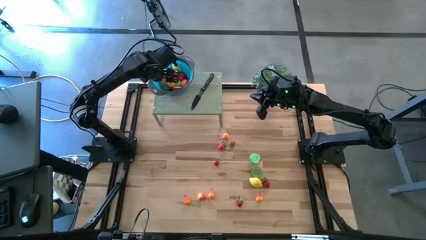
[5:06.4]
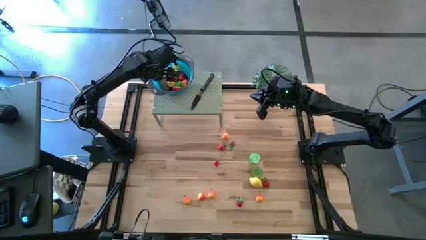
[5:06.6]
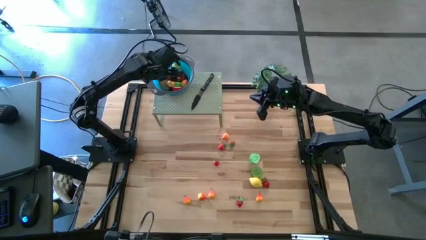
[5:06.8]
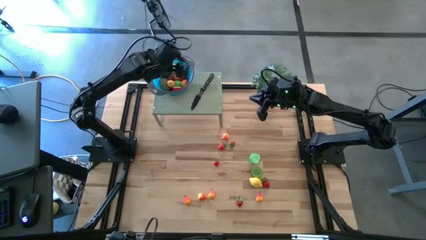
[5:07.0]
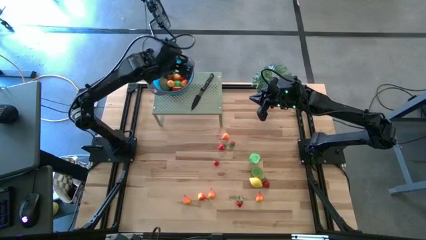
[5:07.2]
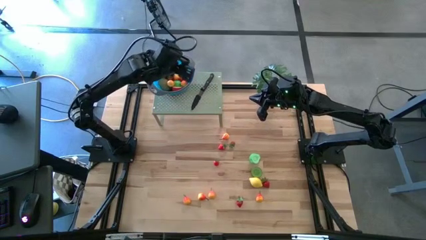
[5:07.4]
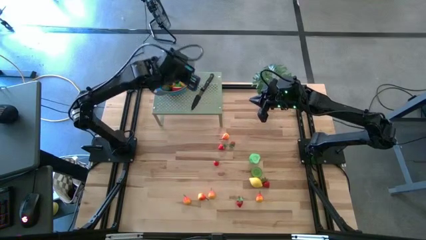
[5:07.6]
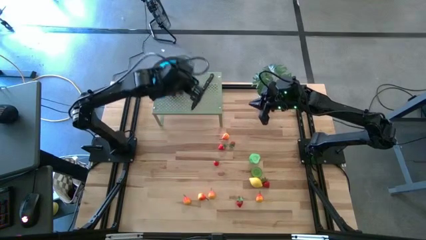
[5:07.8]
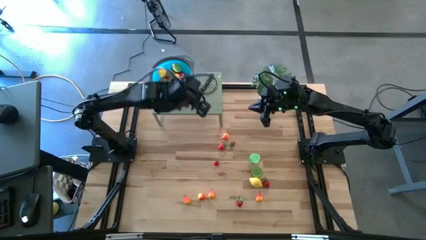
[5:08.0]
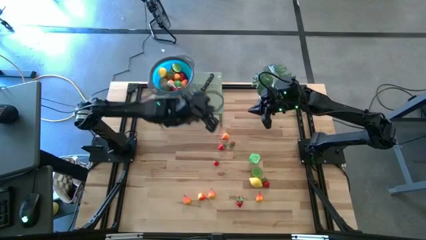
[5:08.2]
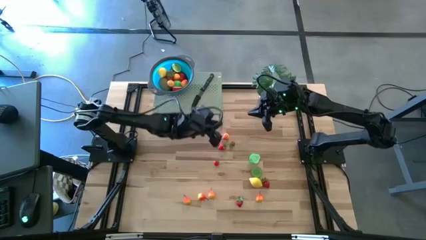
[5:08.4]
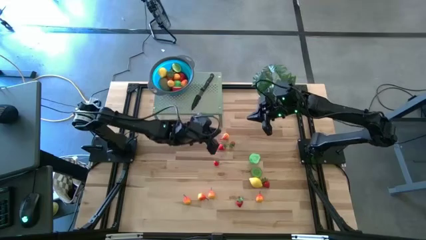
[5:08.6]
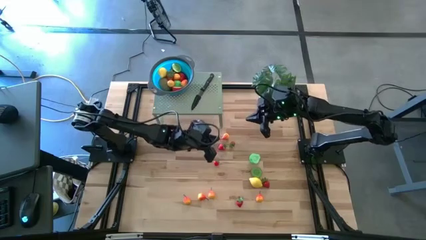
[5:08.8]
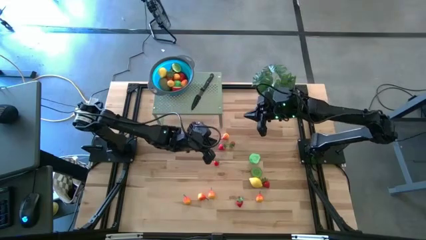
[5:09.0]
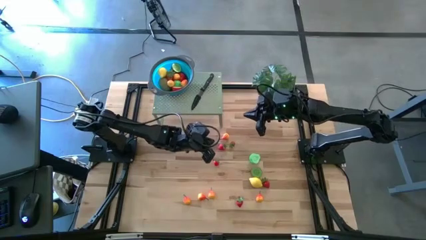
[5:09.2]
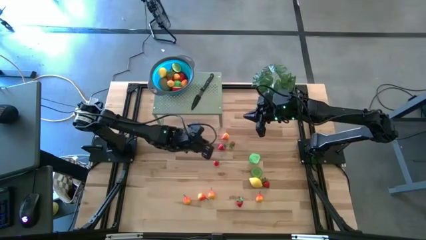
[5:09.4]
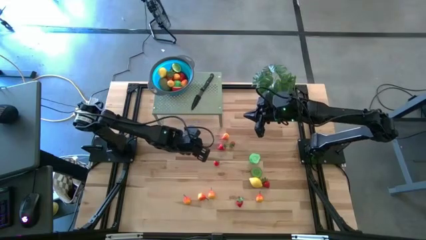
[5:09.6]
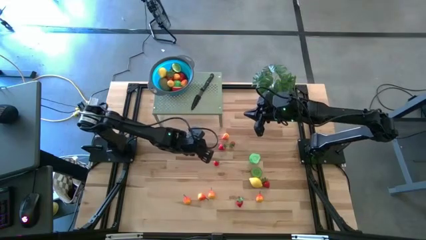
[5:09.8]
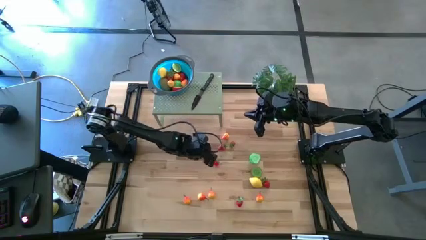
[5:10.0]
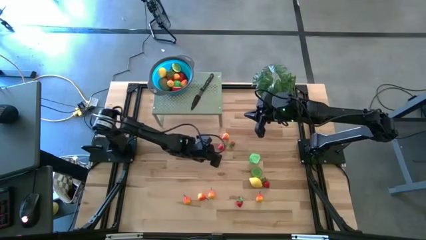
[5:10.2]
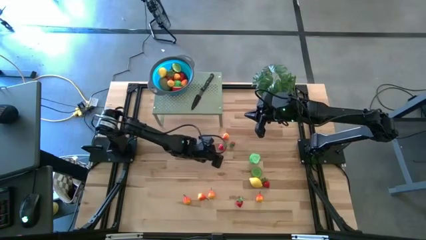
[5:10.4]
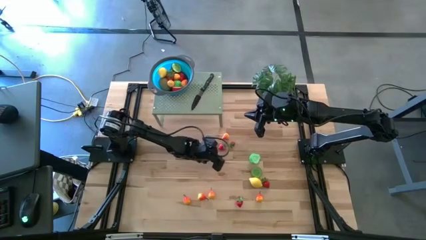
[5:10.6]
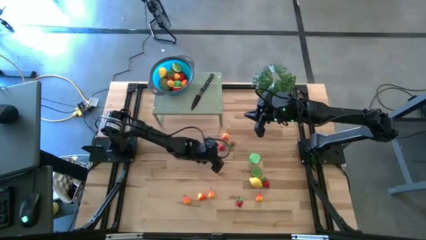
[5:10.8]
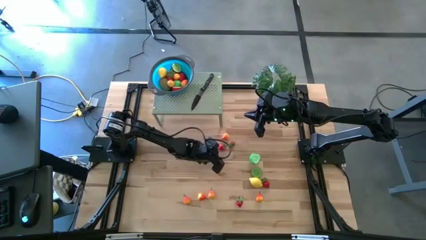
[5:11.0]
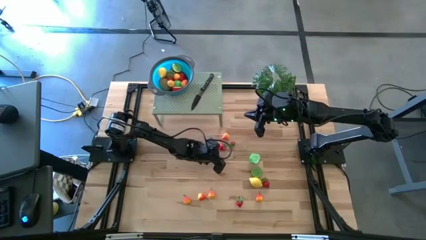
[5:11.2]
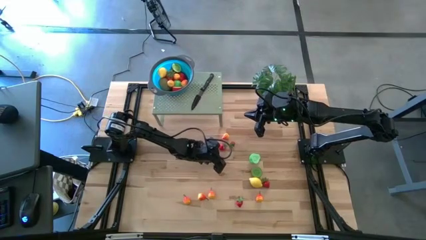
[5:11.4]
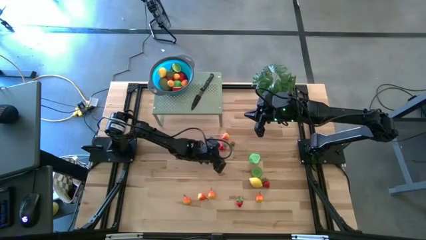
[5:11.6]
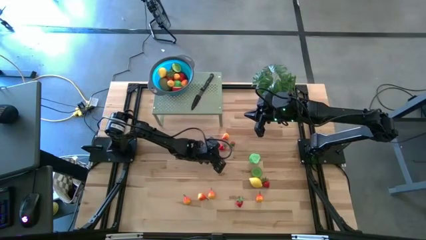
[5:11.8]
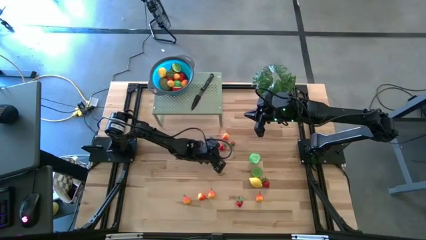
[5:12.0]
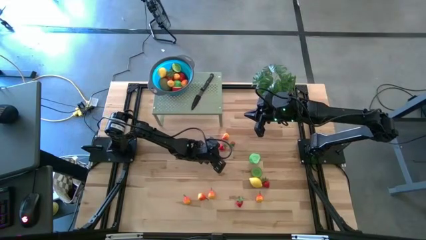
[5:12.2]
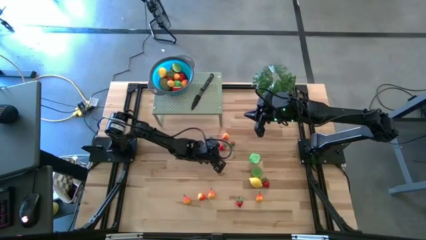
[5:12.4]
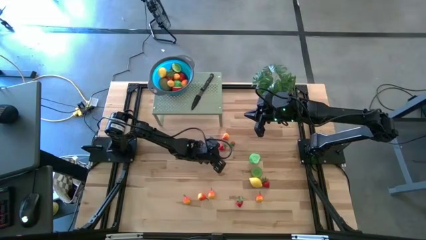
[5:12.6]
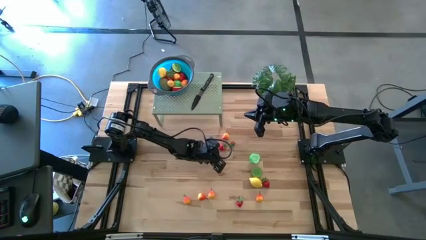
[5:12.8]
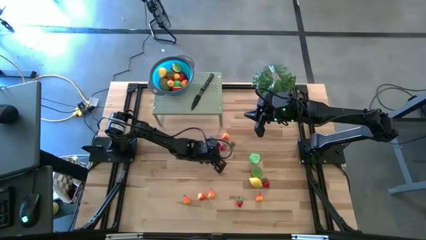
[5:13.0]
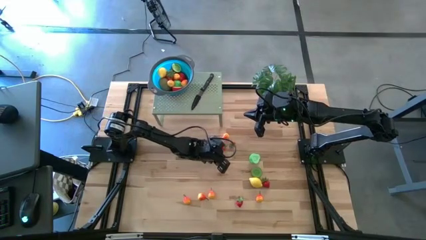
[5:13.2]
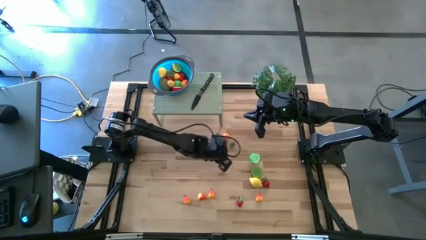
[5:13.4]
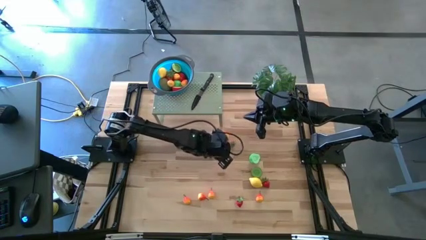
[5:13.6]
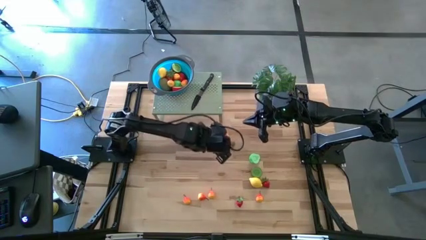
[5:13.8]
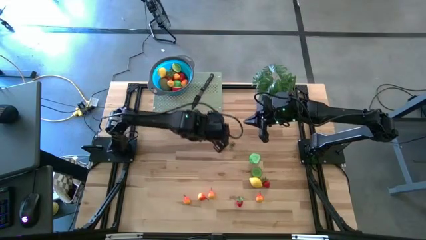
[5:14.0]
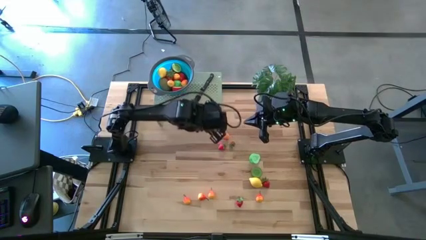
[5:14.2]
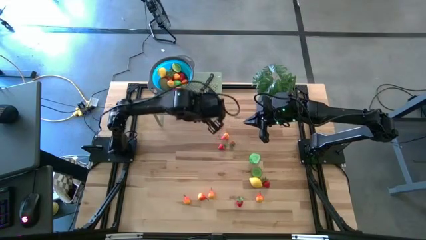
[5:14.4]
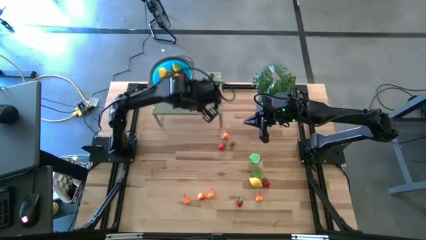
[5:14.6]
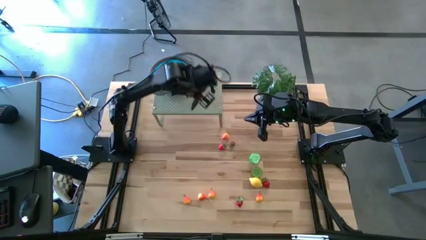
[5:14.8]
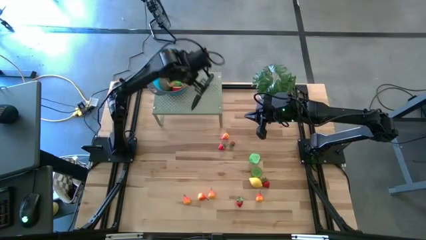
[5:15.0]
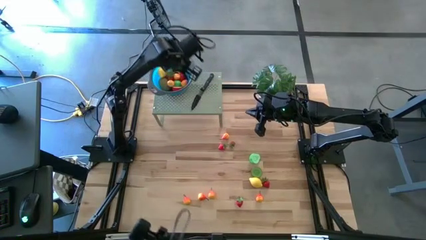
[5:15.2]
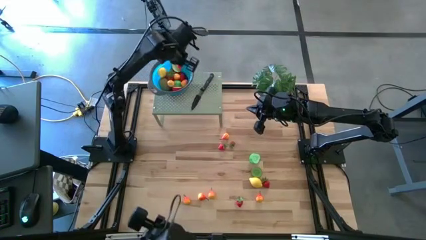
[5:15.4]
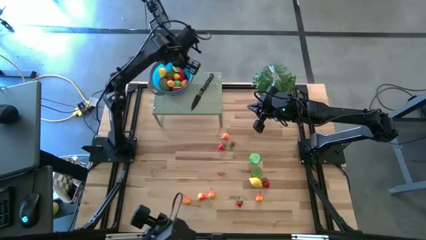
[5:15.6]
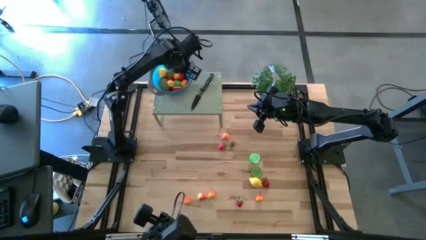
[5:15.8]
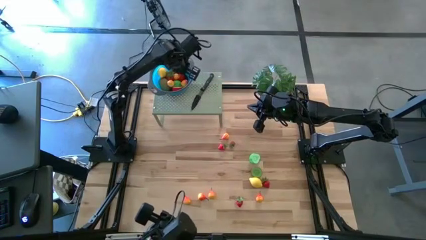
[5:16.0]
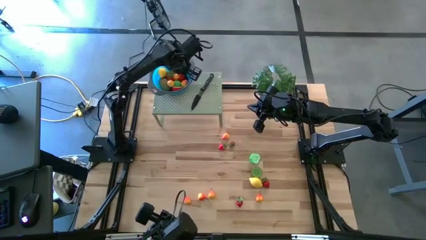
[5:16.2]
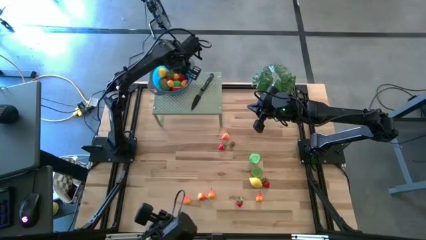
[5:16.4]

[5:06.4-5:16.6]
Task: Pick & Place Fruit
Put the strawberry into the strainer bowl on the shelf

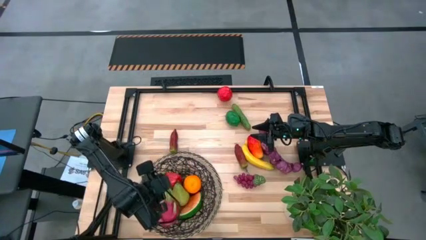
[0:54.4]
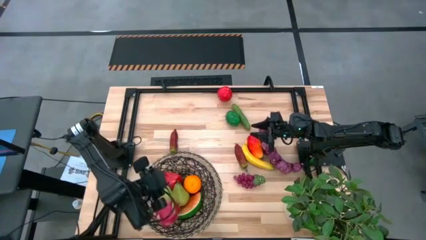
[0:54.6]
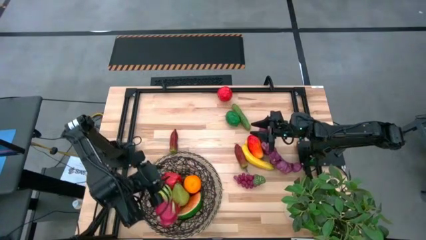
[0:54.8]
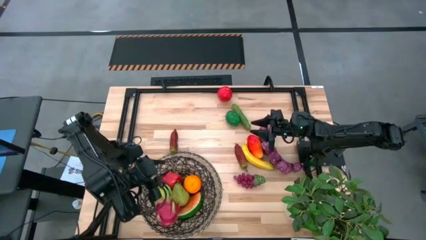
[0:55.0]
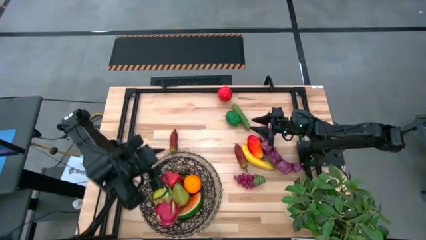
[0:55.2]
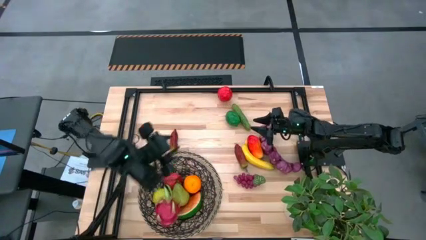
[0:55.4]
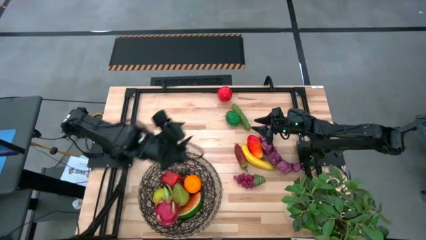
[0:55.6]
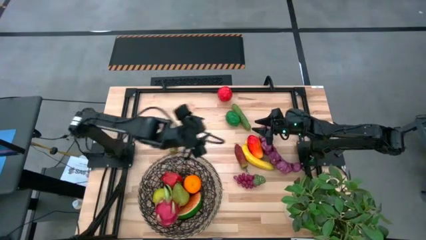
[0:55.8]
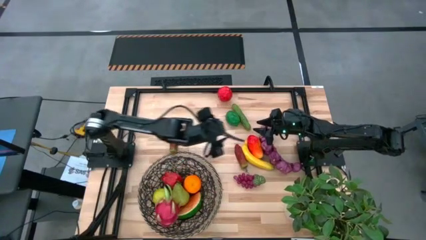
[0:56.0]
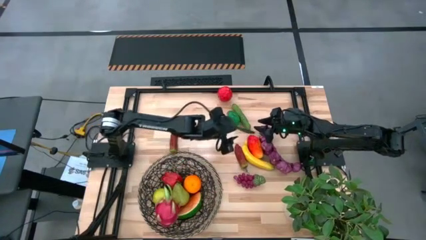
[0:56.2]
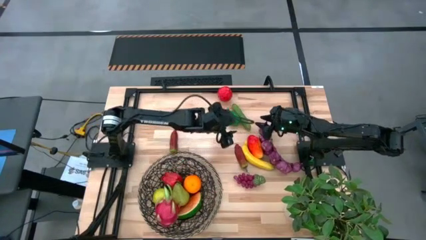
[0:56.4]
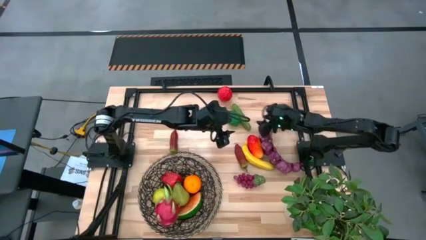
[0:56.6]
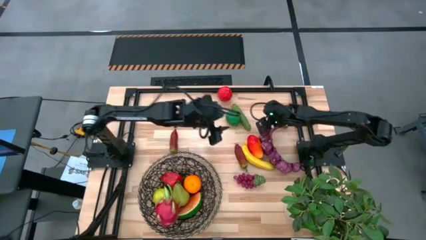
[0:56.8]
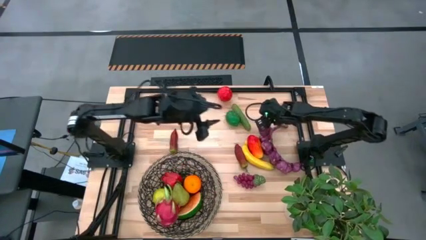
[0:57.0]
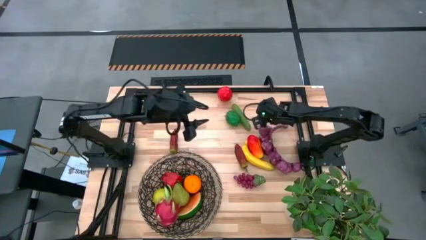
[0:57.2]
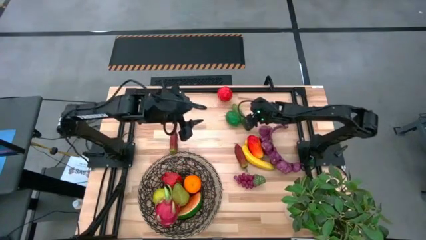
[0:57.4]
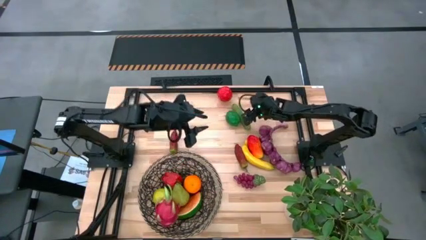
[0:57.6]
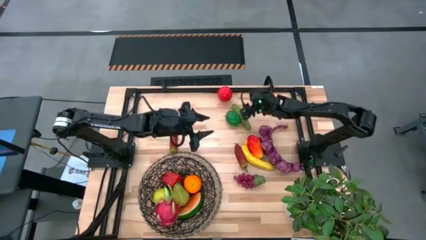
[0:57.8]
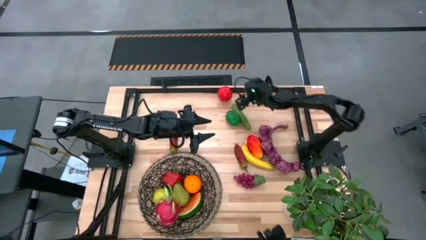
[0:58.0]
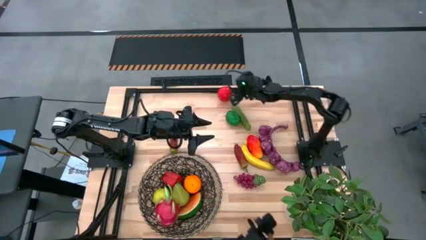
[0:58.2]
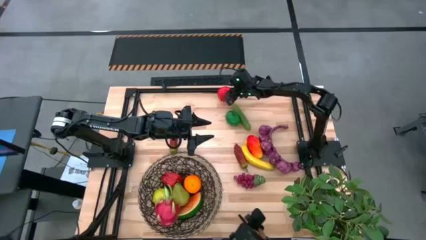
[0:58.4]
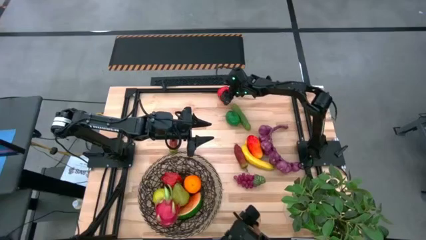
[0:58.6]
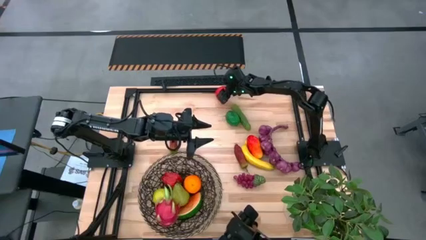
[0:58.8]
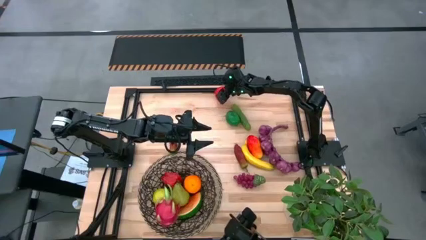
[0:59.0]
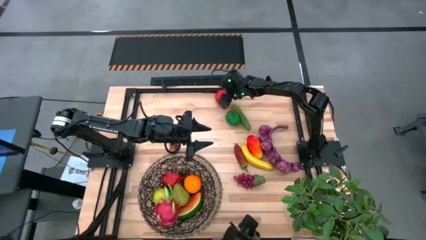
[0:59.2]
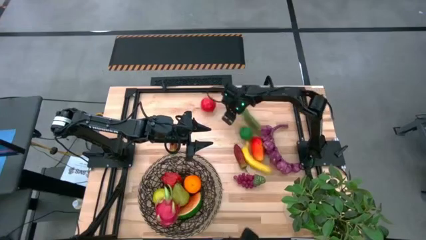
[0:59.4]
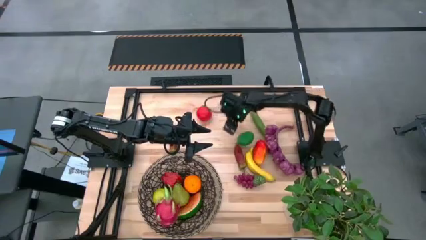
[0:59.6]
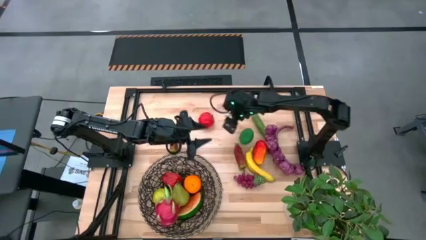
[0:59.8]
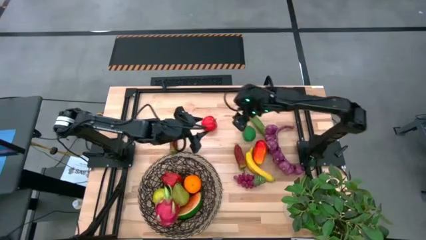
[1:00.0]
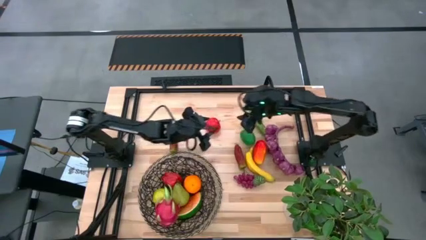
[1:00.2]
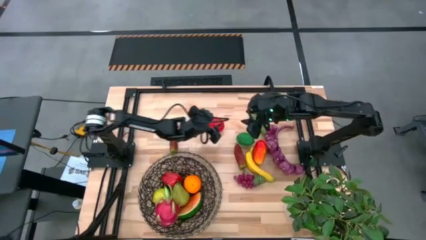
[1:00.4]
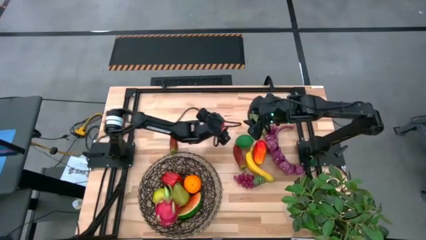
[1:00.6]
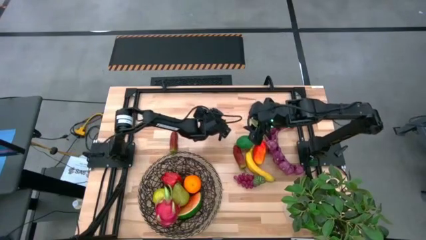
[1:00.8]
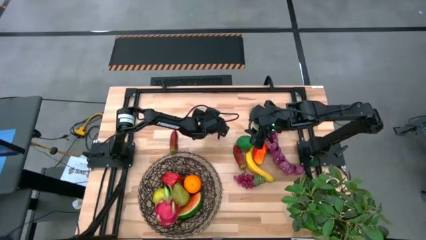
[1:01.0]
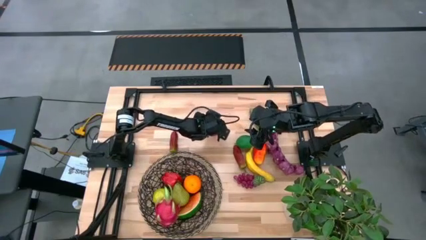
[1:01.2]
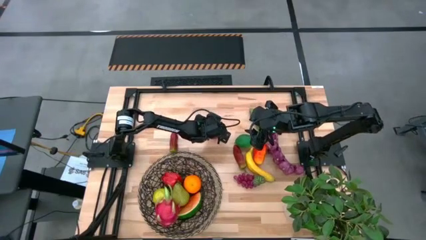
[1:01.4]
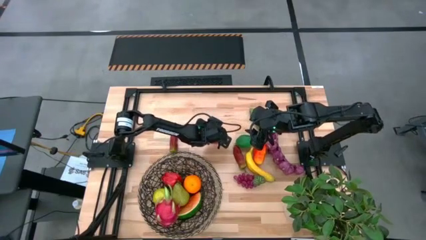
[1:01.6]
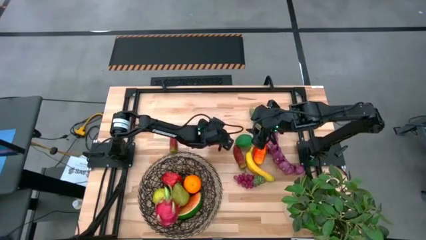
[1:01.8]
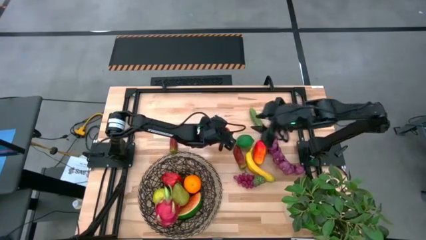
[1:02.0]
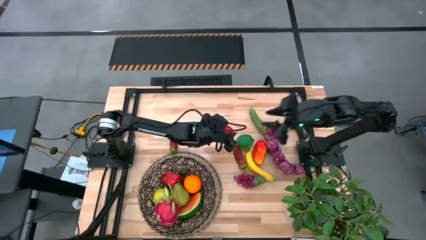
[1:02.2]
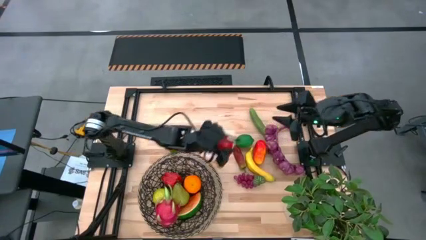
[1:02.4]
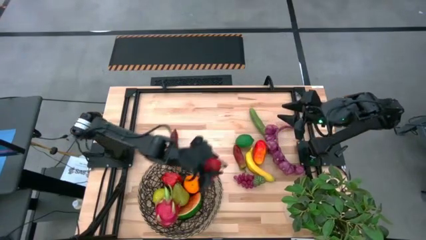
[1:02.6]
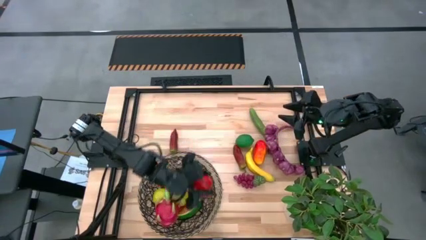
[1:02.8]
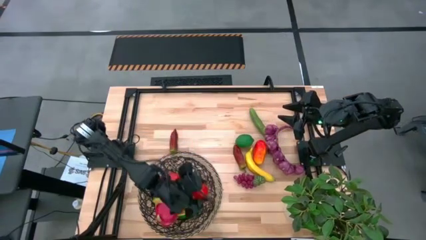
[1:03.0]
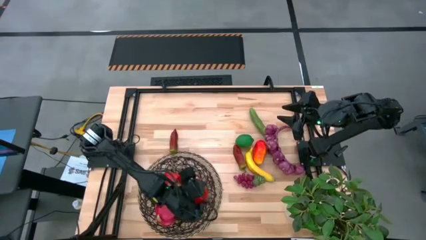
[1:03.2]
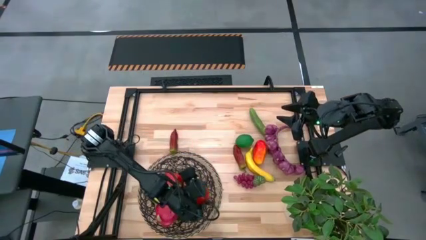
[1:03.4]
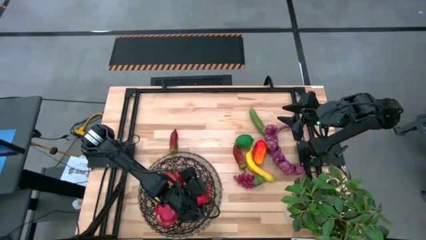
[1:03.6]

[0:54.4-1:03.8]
Task: Build produce basket
Put the red apple into the woven basket
